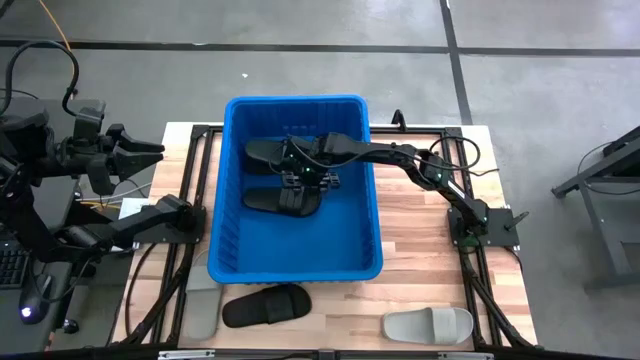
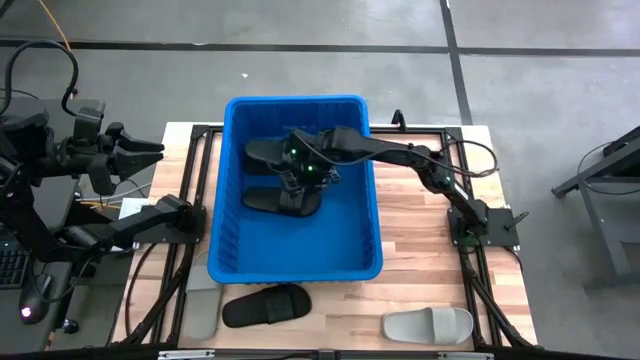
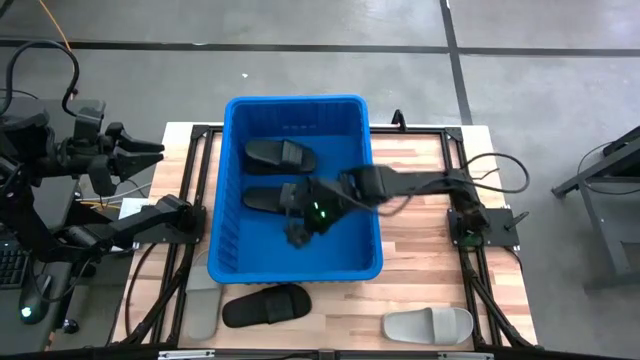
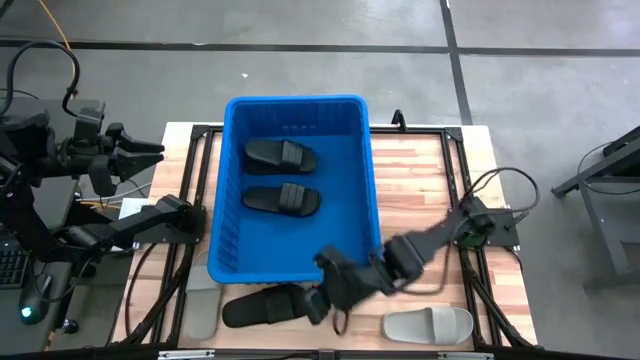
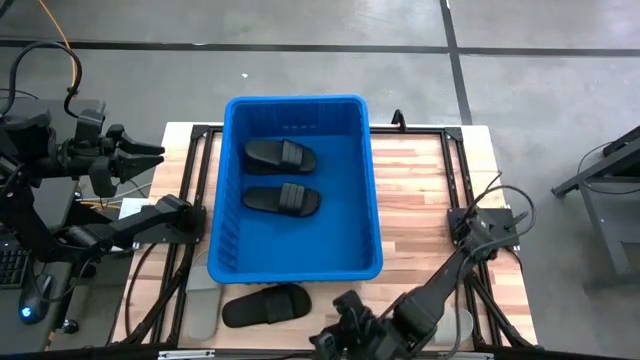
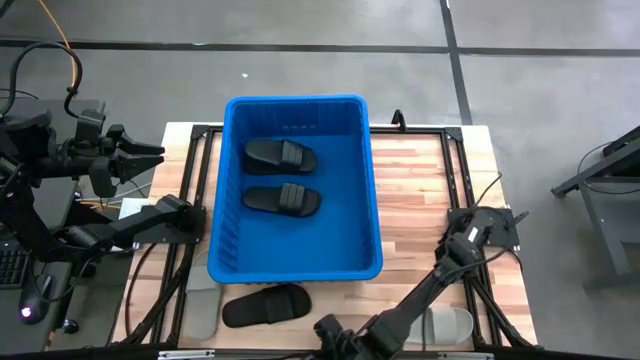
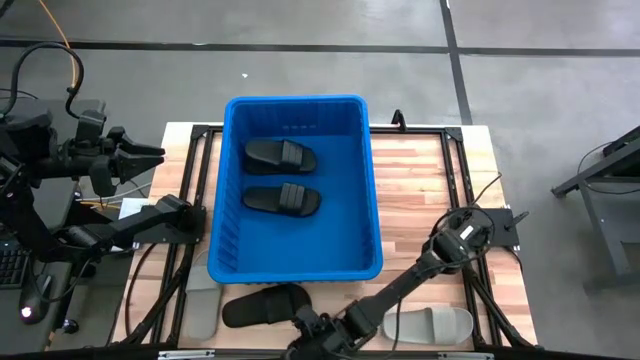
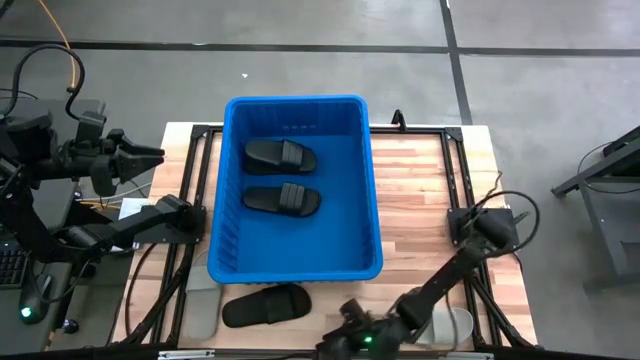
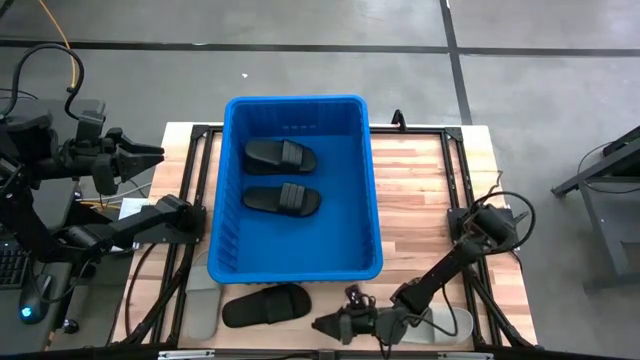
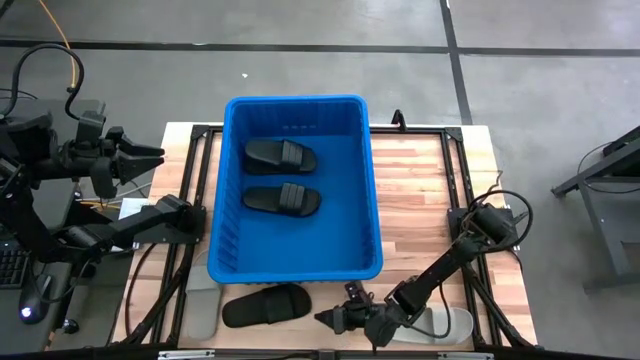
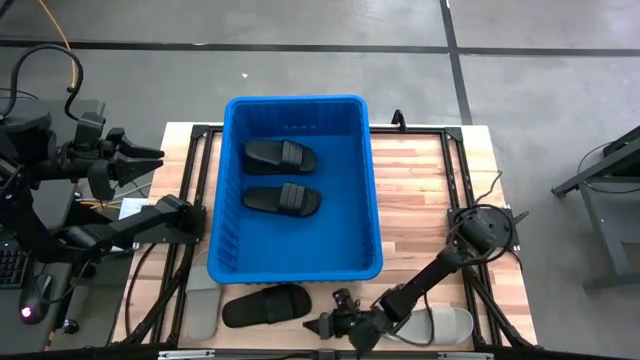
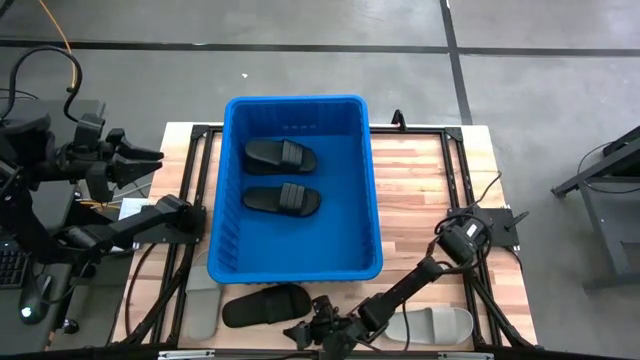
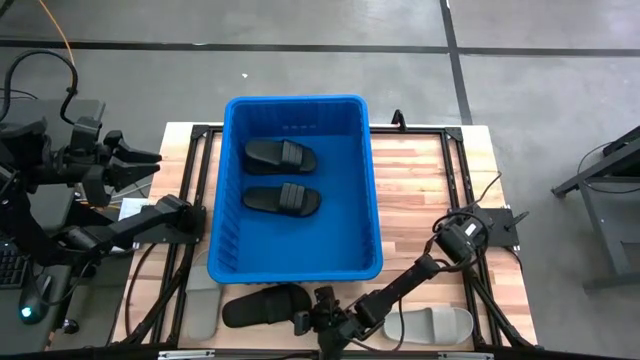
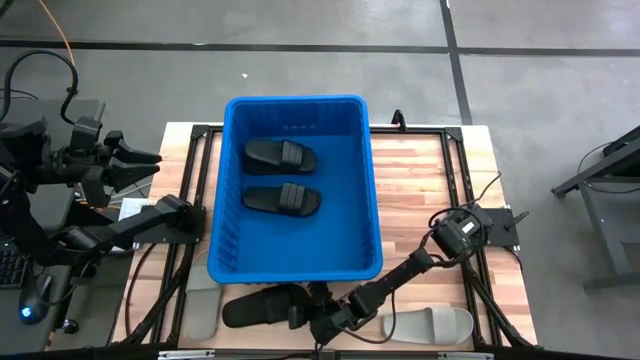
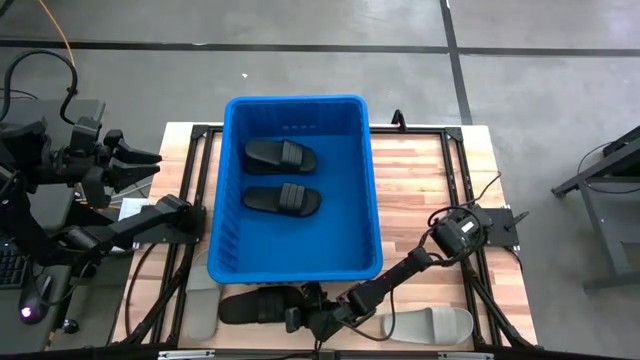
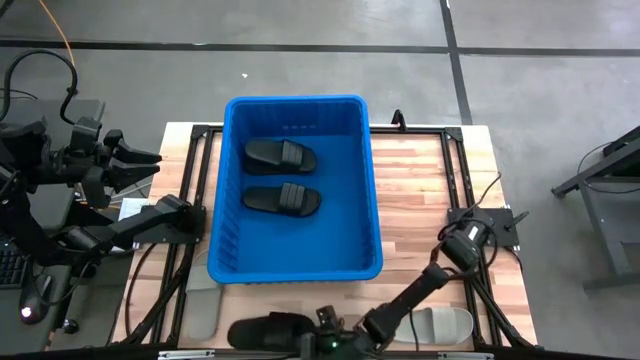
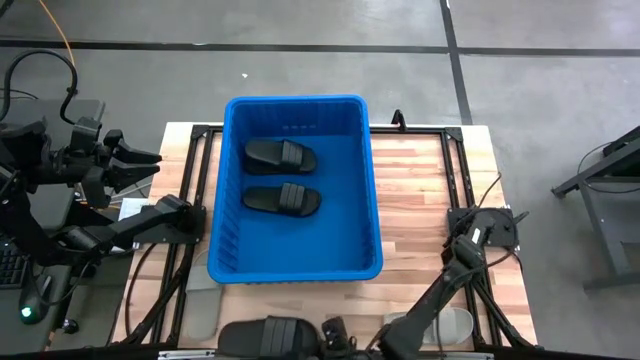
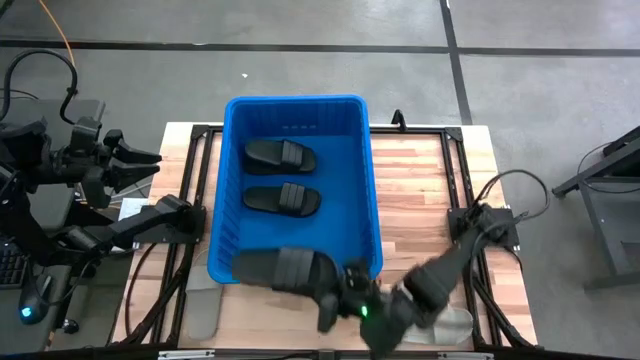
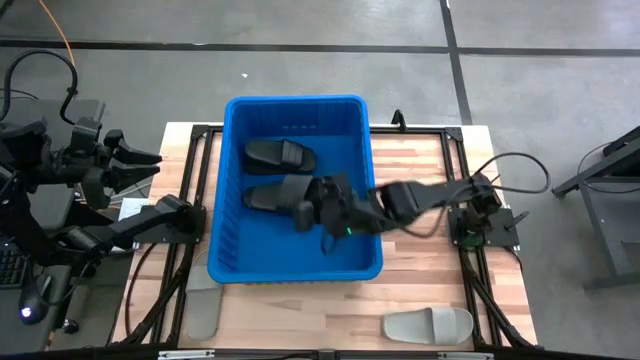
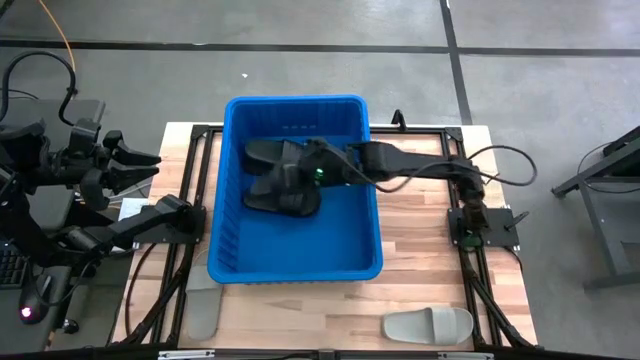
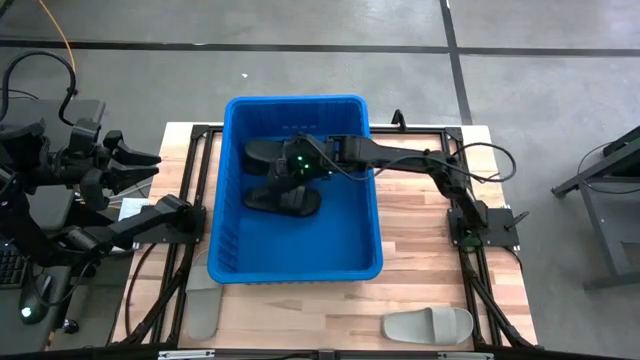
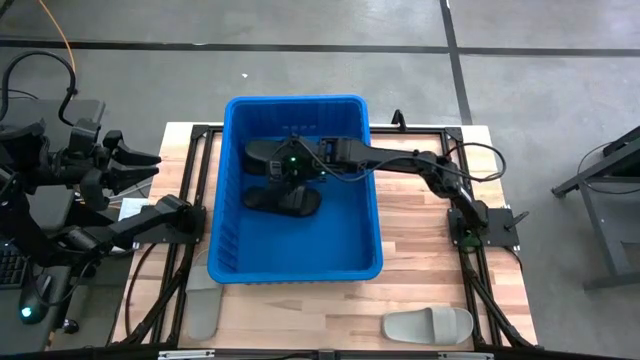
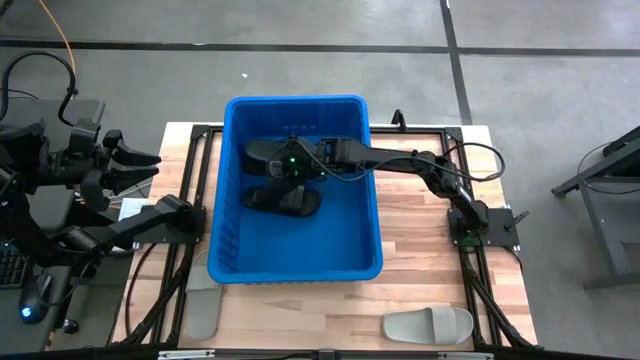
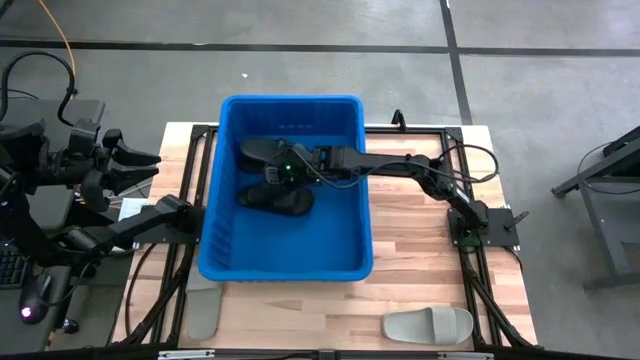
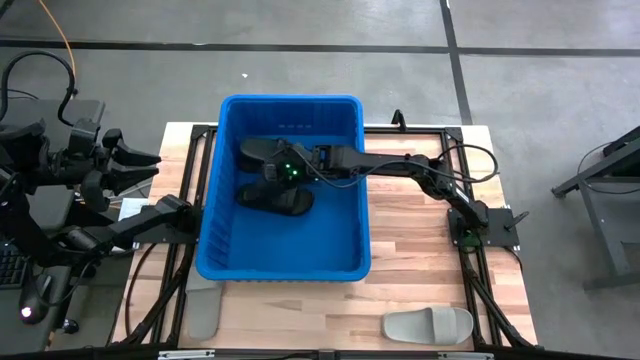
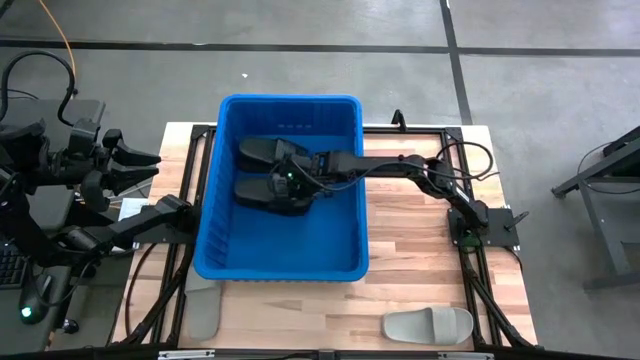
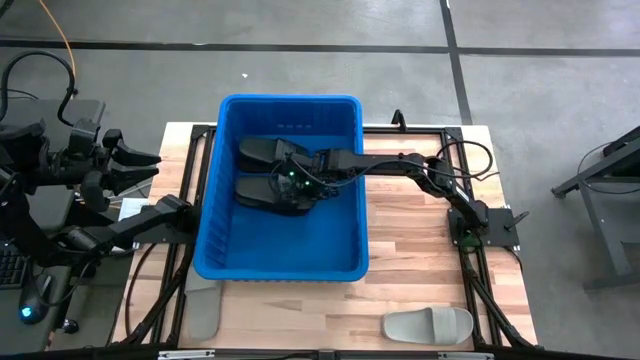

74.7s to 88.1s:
Task: Pick and place slides into bin
Put the black slide into the blue container

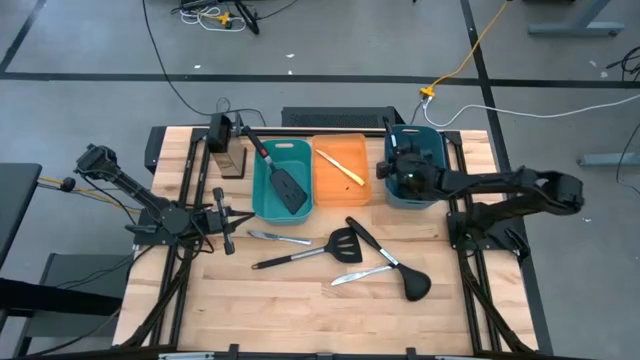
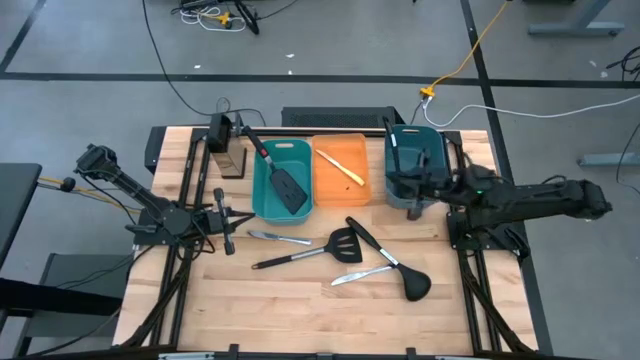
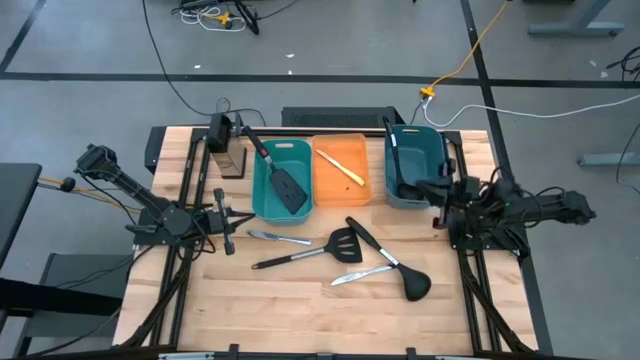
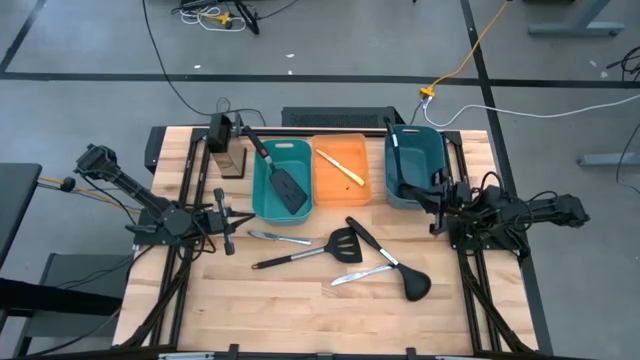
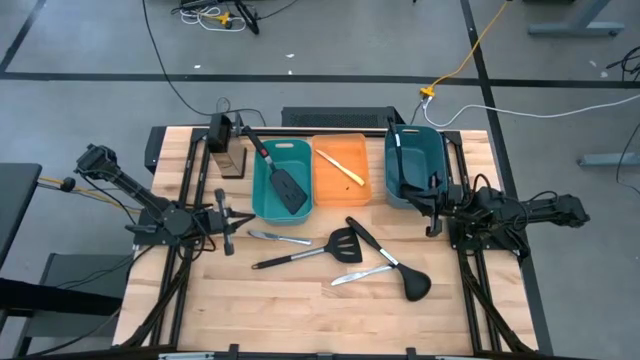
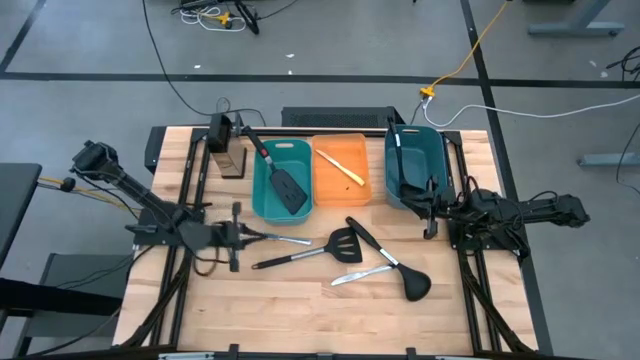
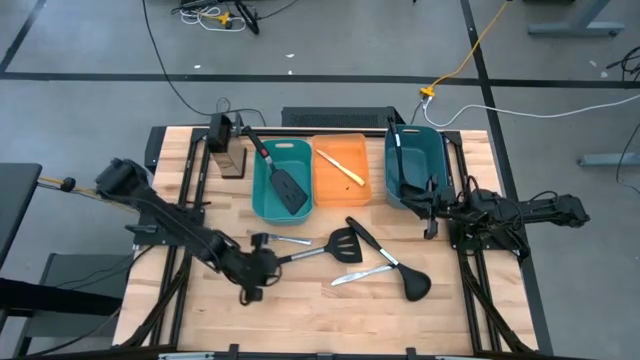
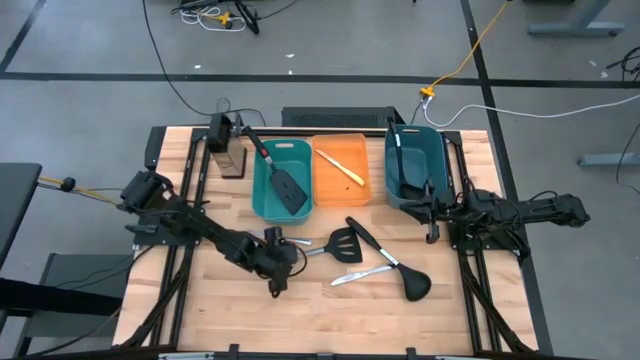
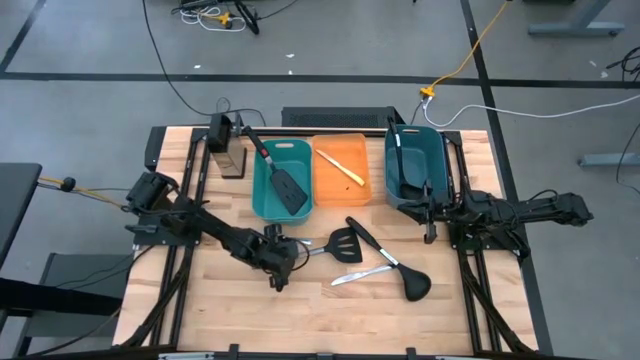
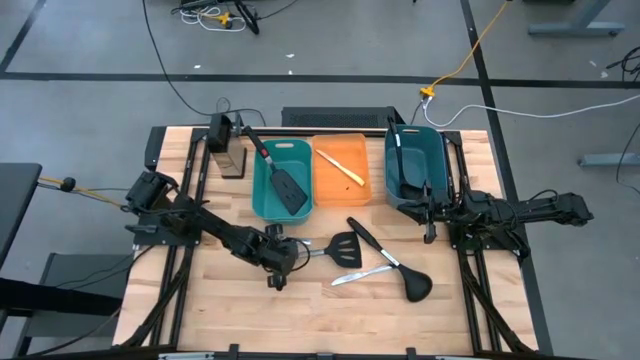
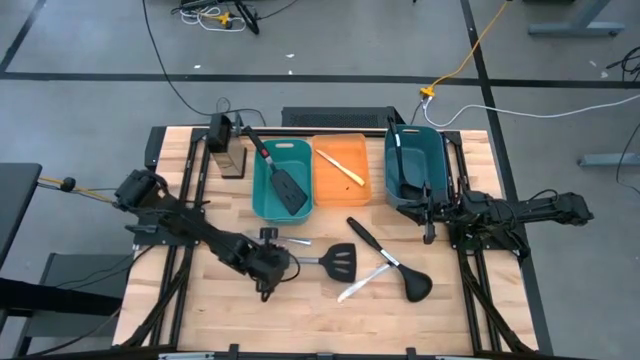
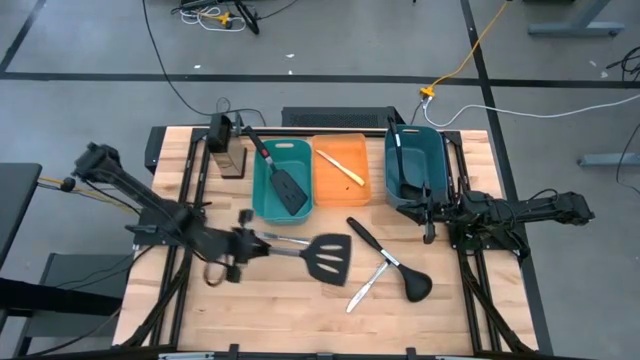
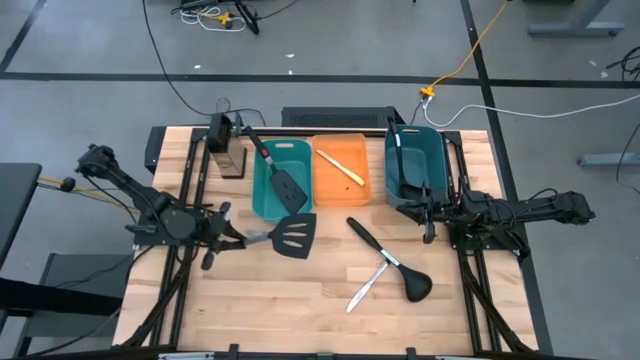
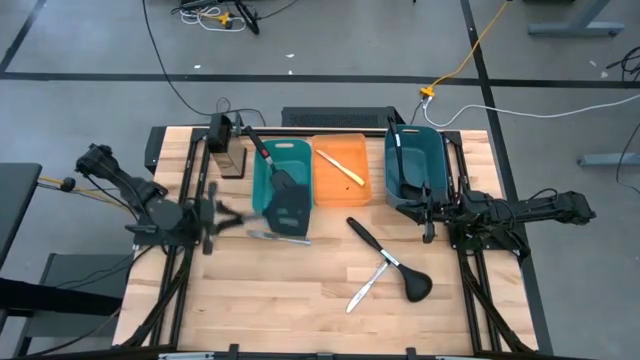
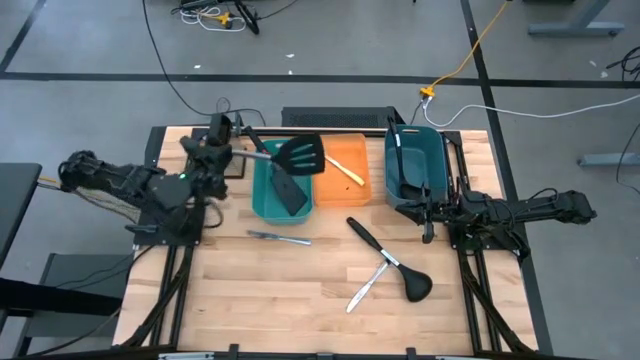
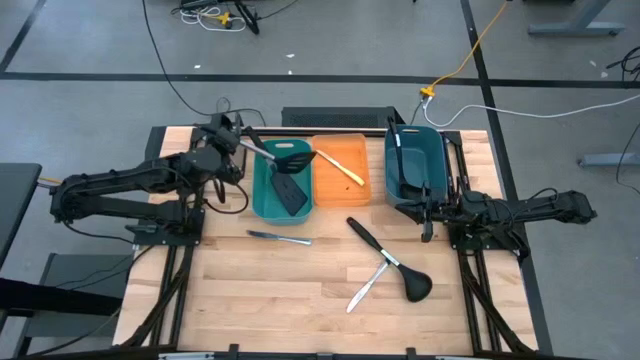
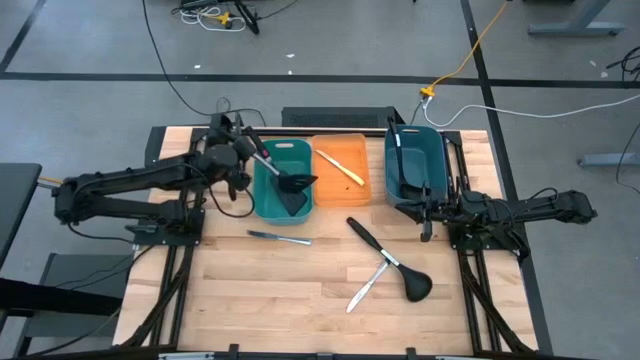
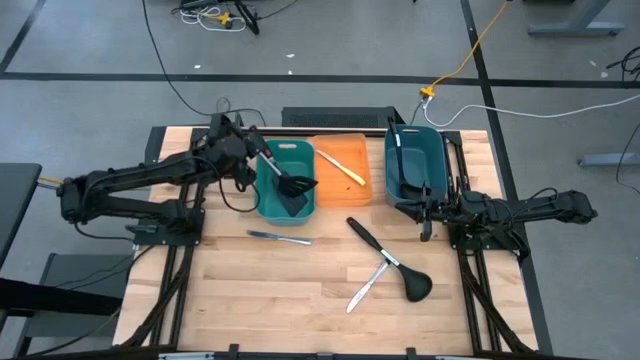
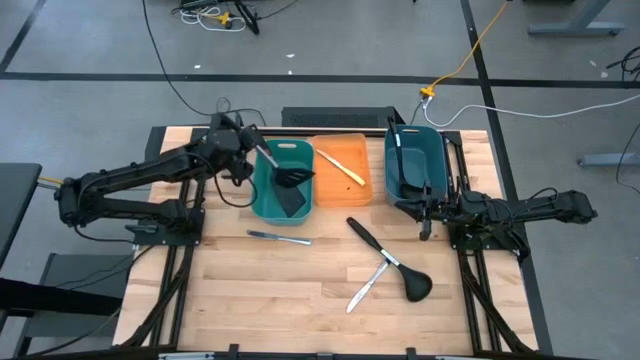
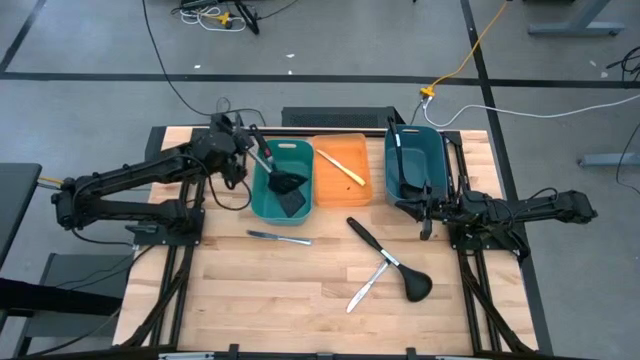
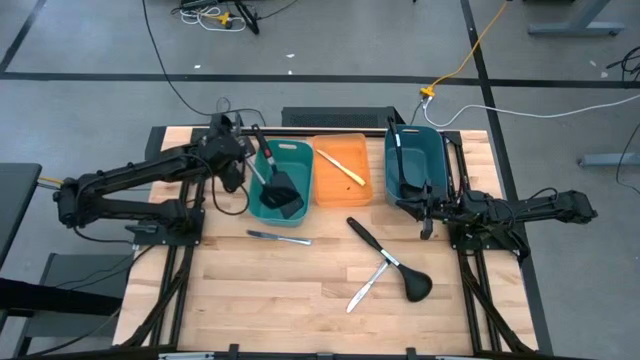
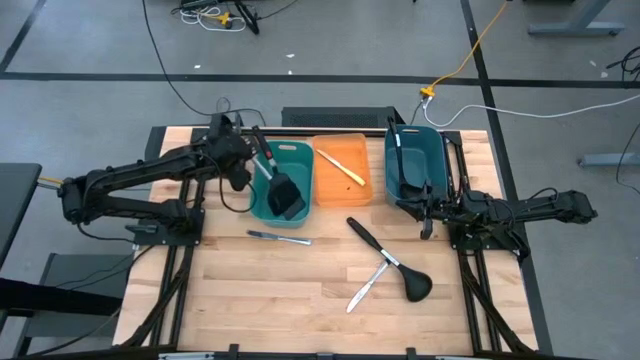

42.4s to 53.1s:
Task: Pick & Place Kitchen Items
Put the black spatula into the light green bin
